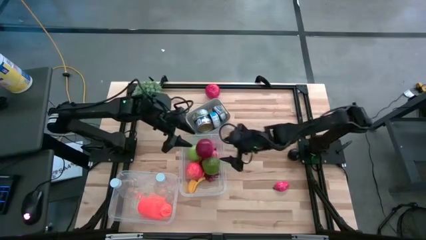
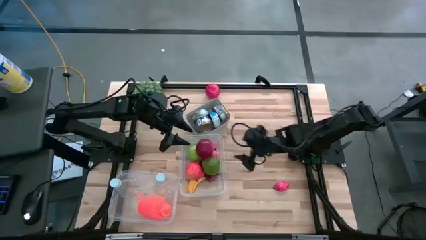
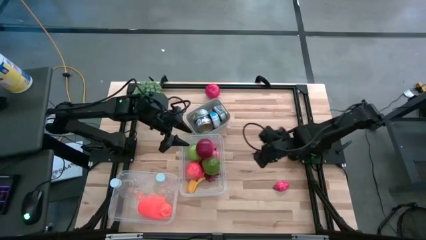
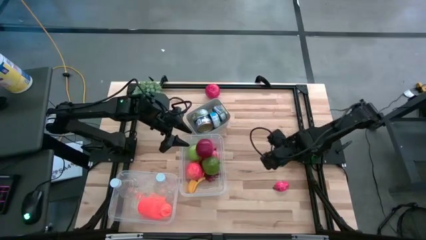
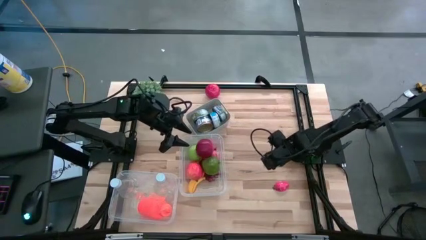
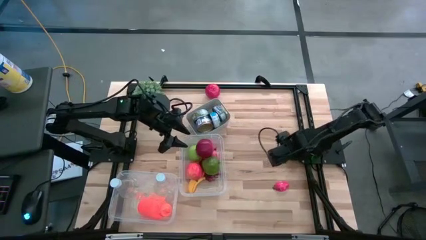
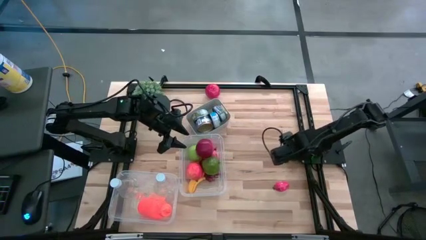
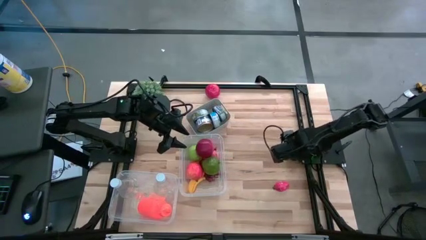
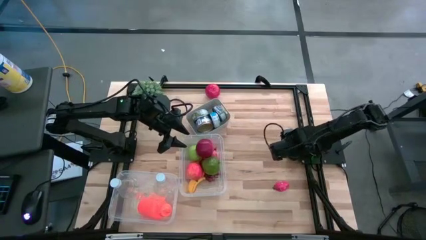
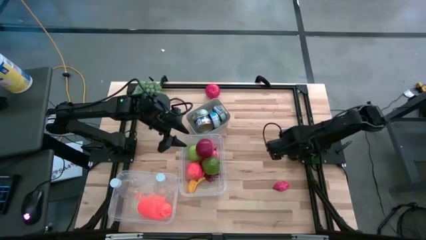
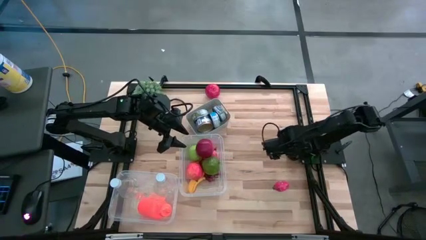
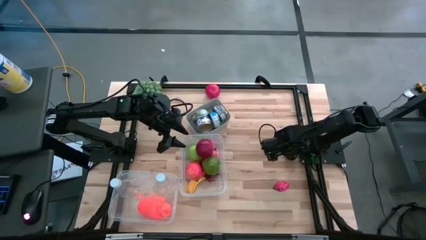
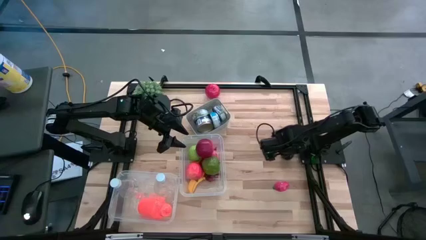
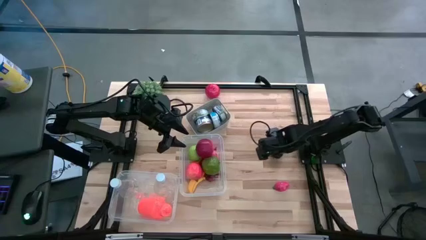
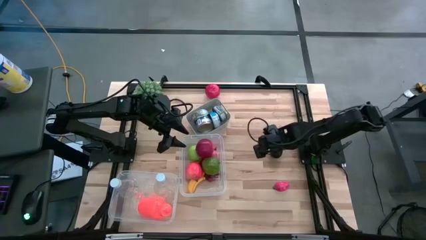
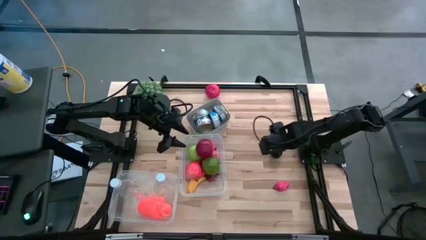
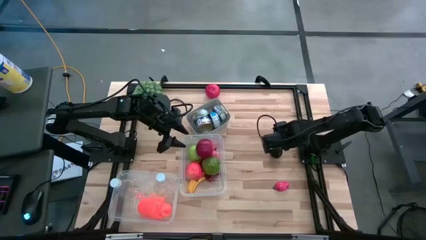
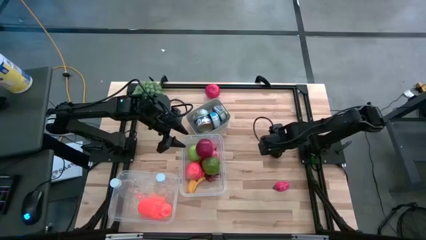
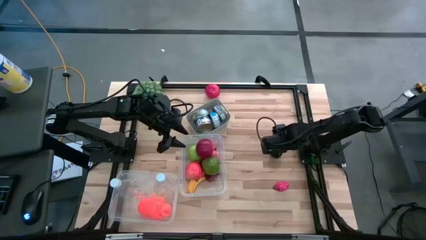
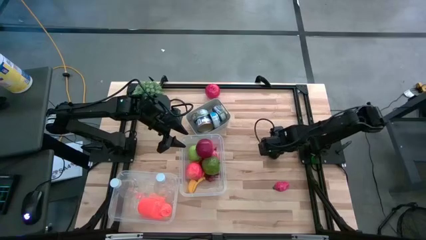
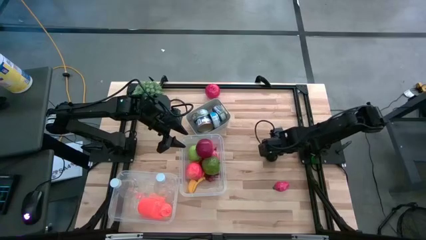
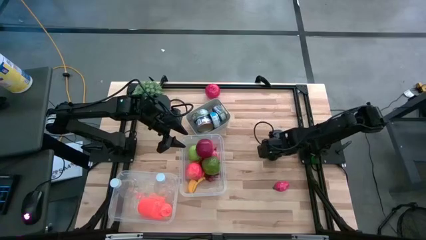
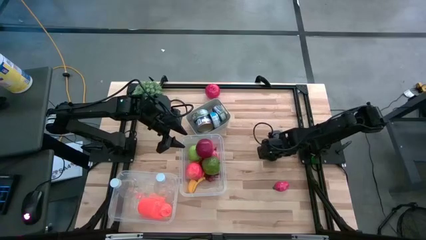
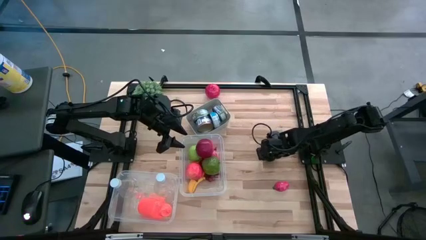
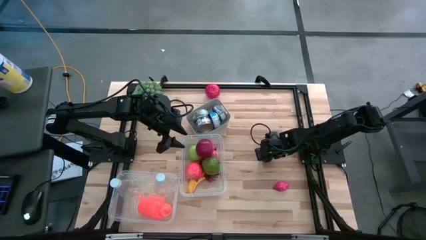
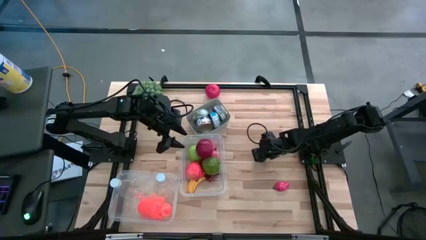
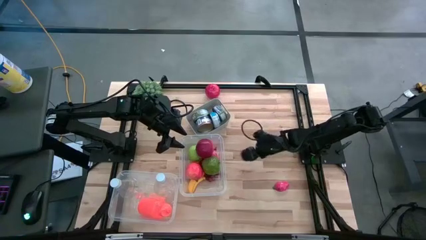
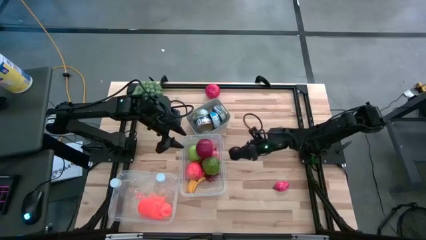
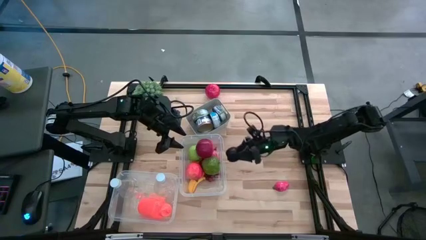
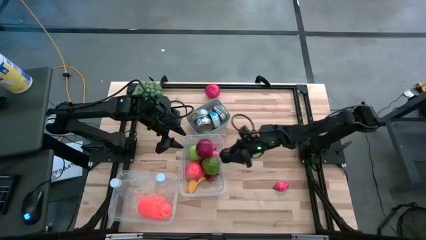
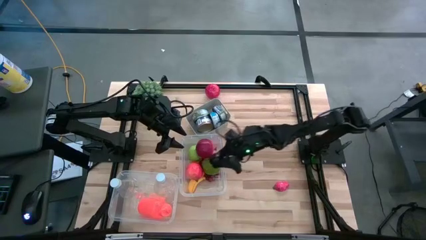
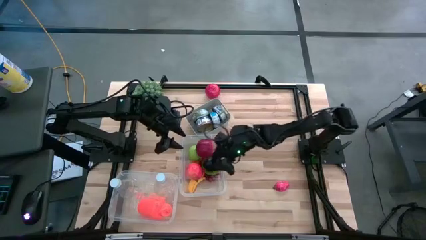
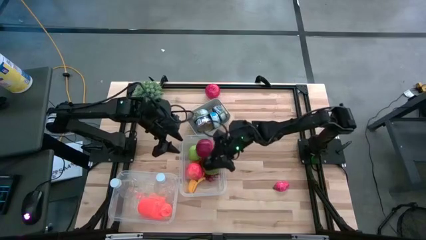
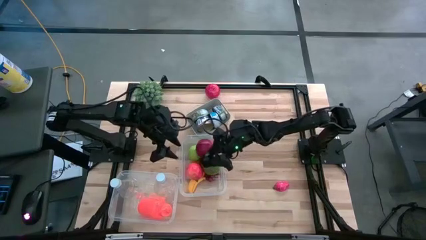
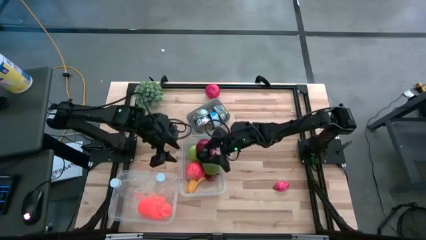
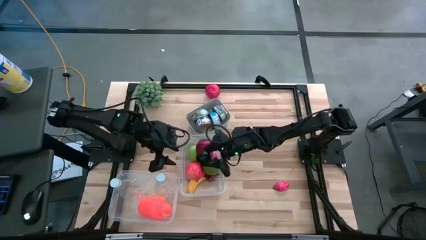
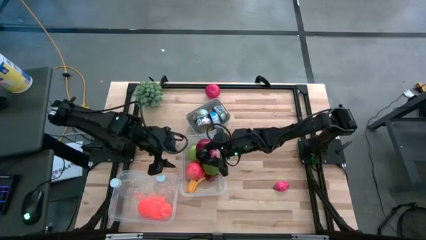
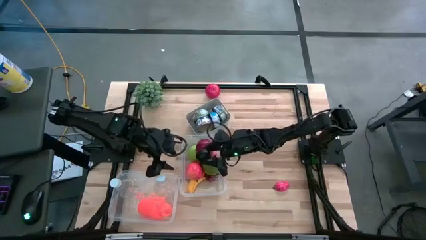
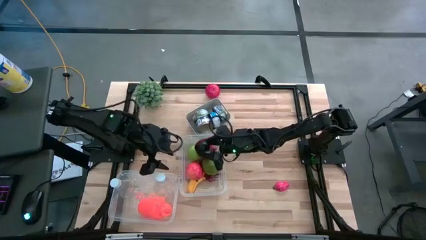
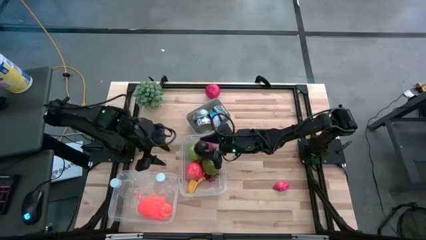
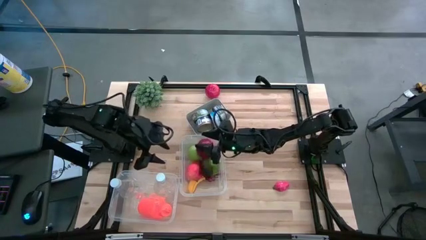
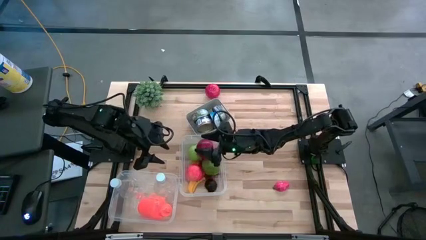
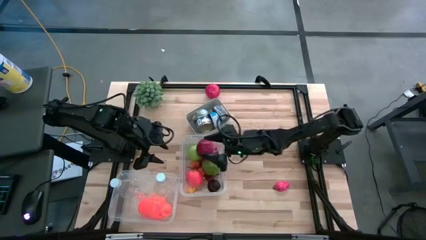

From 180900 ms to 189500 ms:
Task: Pick & Place Food Item
Put the black plum into the right transparent bin

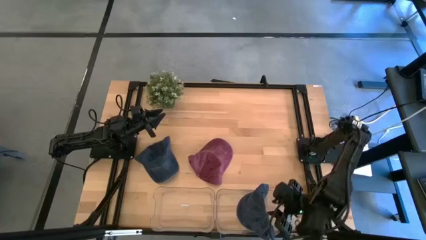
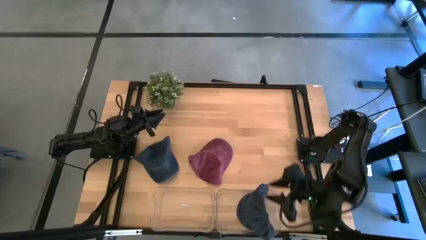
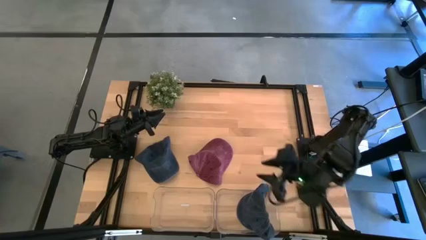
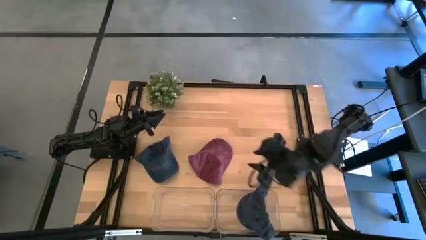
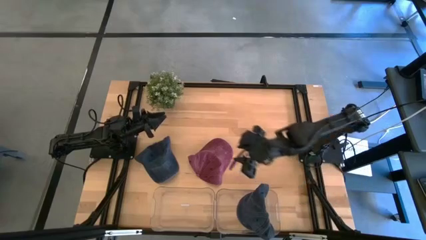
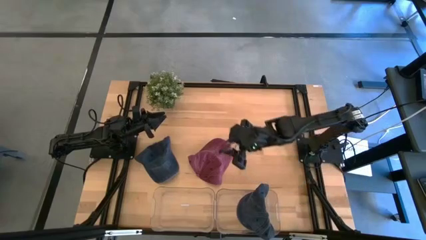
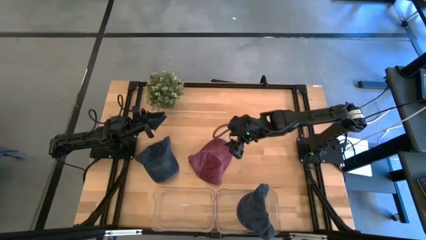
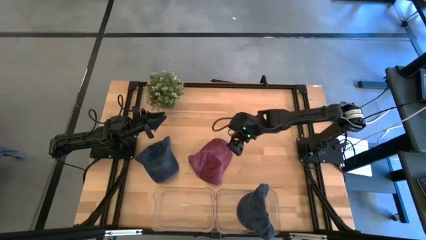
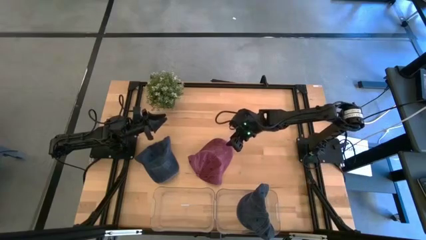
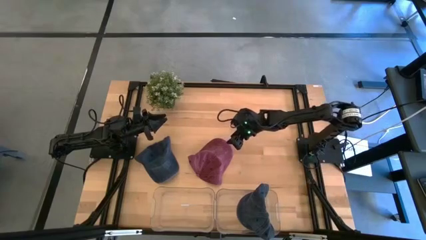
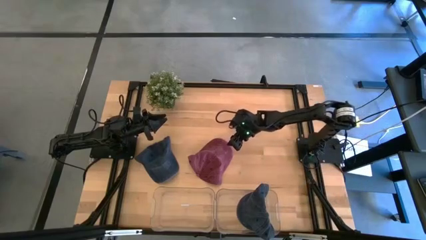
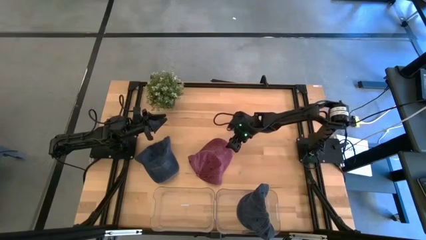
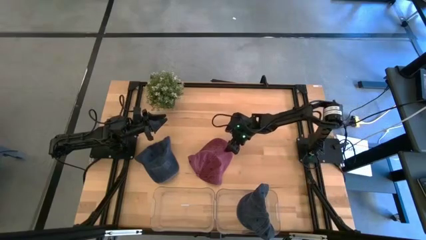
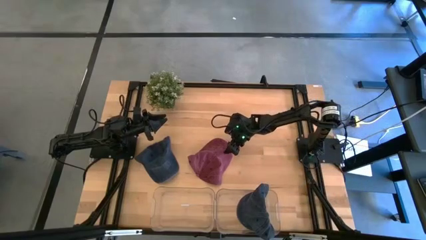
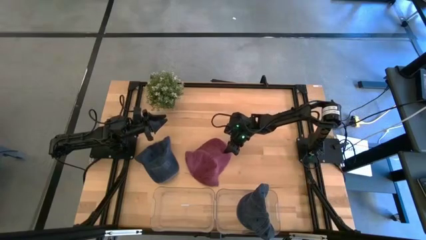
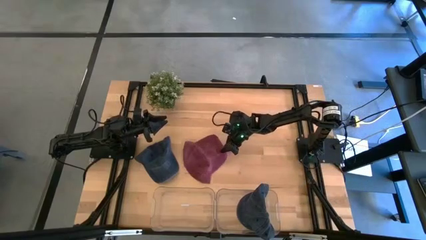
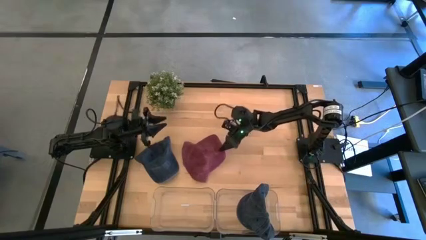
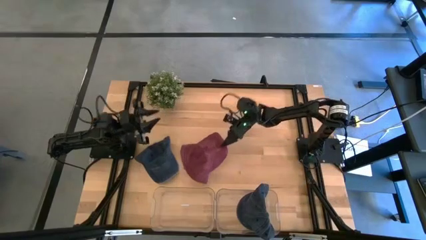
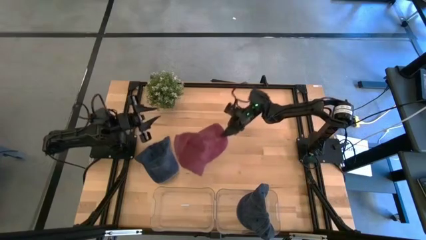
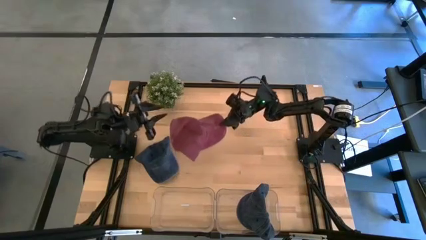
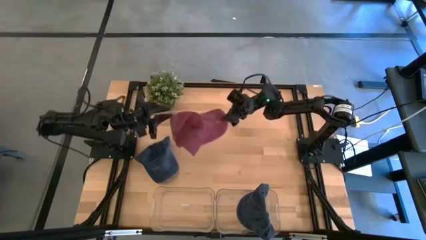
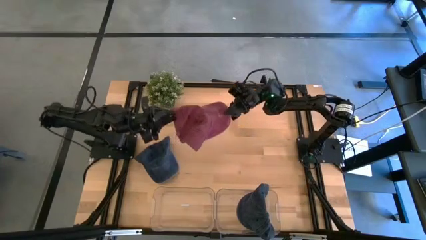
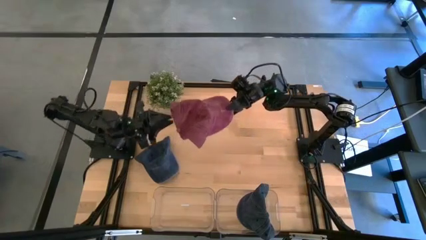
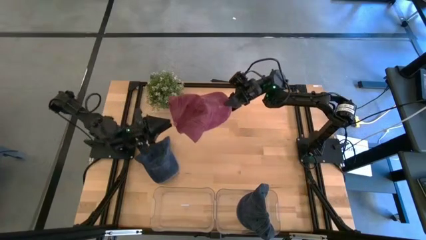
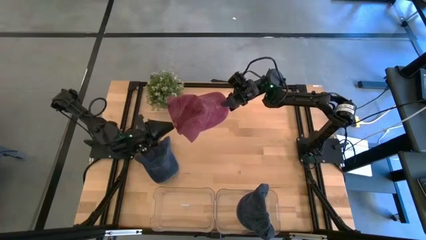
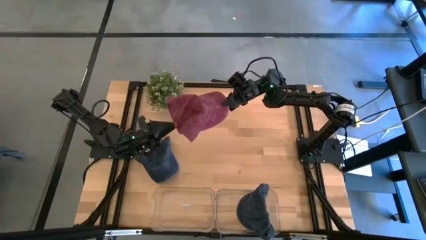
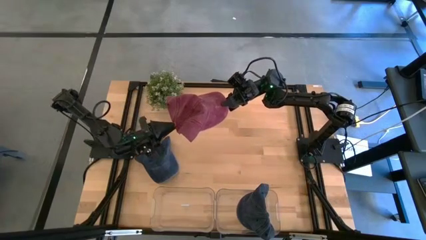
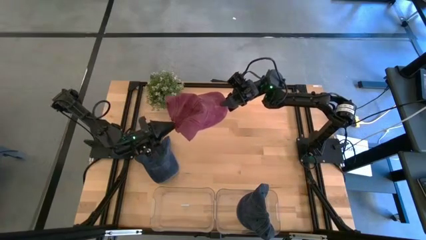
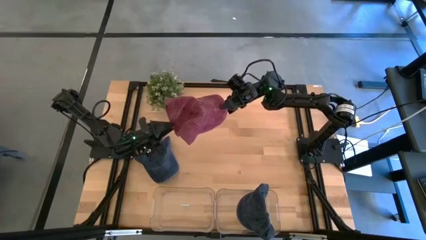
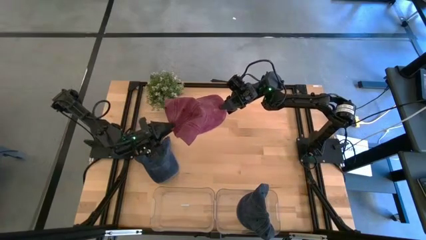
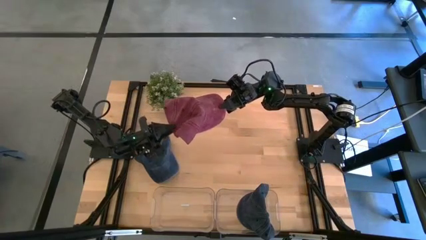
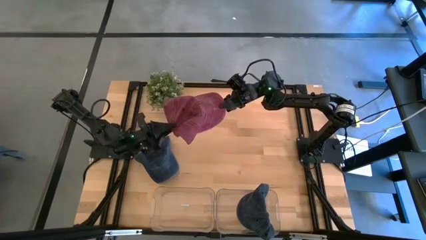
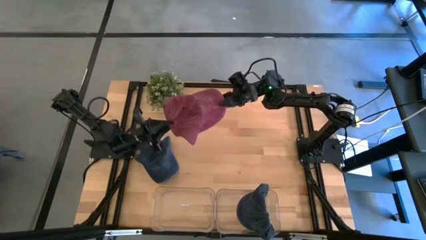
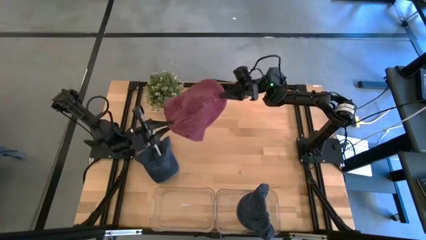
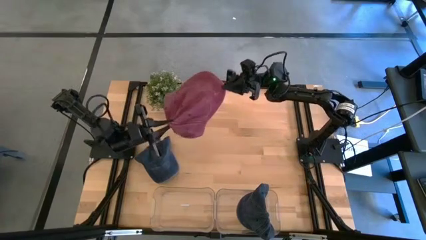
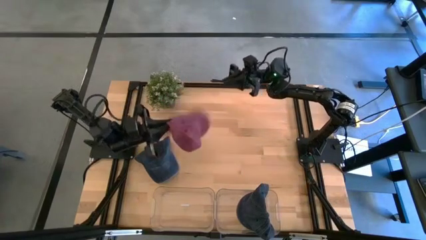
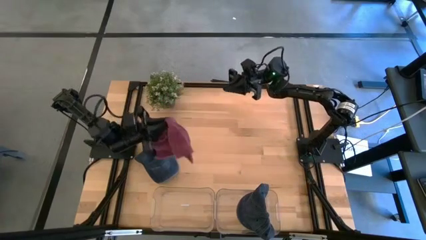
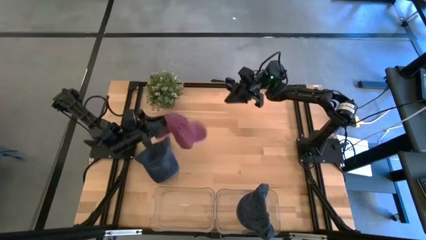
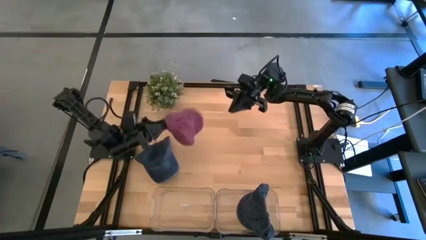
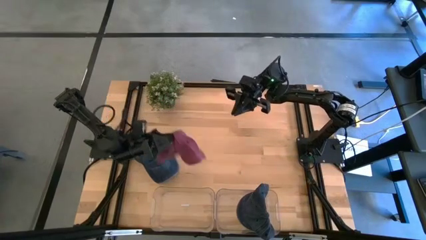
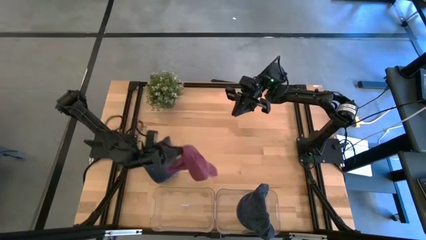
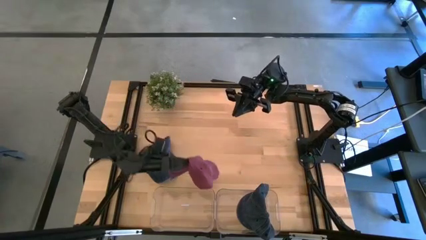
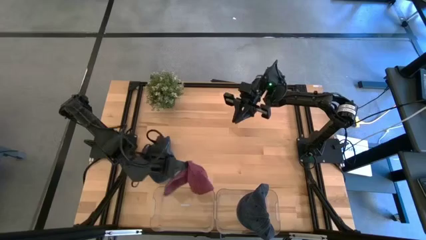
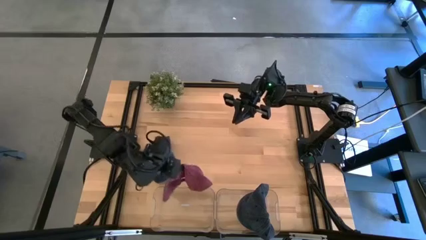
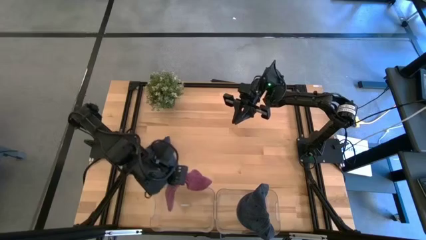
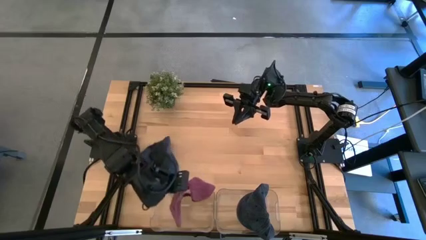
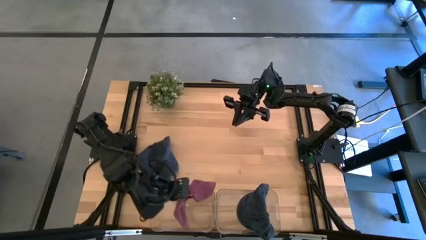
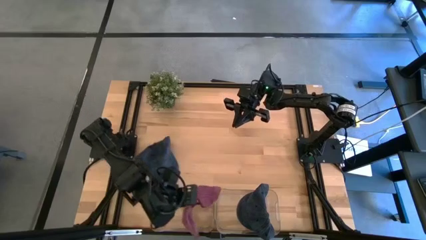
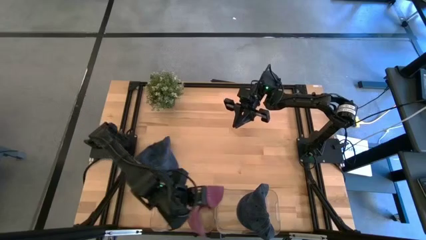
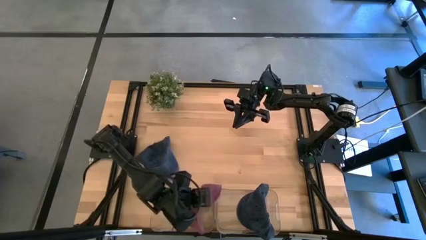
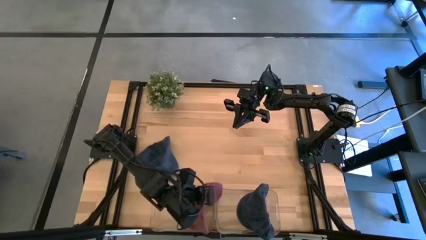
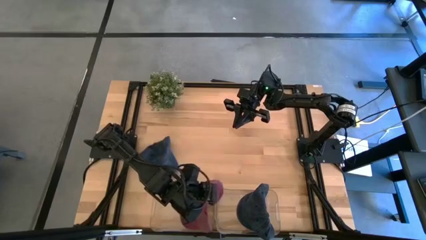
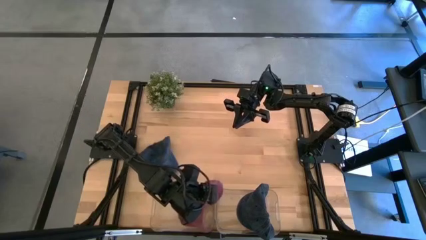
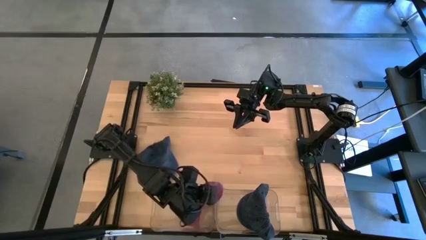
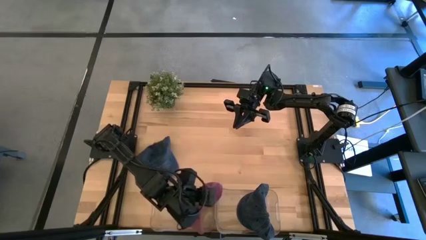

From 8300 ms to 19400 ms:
Task: Pick & Place hat
Put the red cap into the left transparent bin
